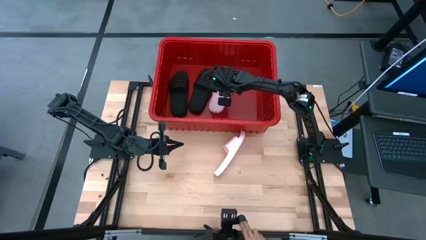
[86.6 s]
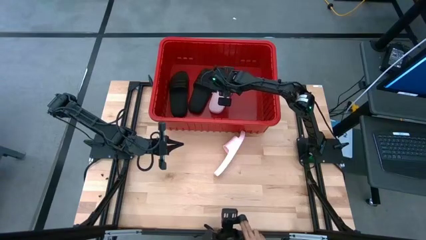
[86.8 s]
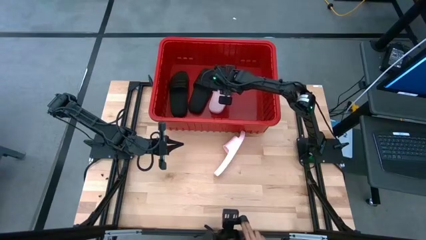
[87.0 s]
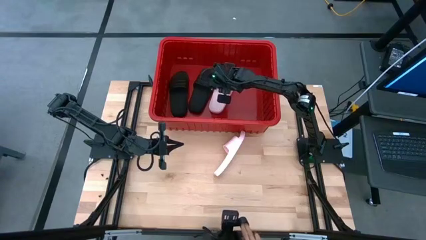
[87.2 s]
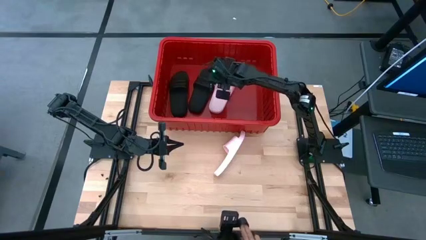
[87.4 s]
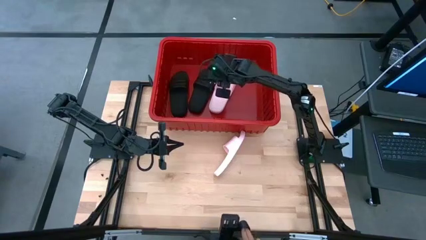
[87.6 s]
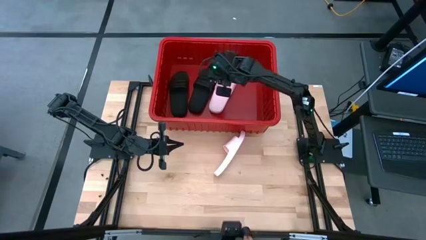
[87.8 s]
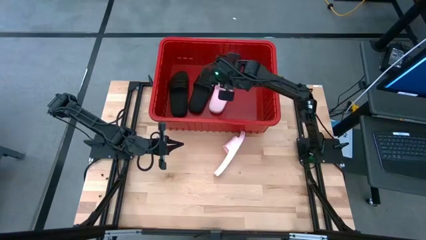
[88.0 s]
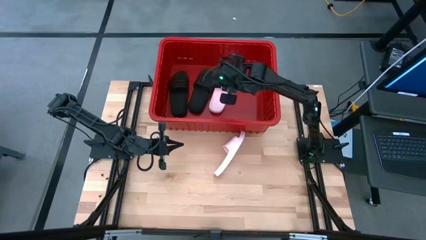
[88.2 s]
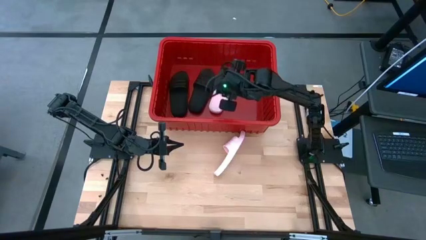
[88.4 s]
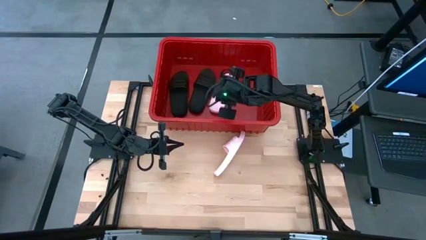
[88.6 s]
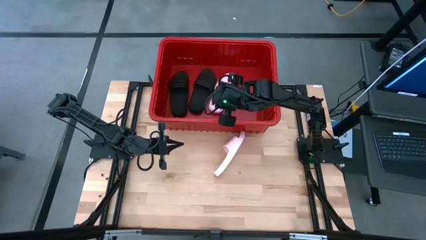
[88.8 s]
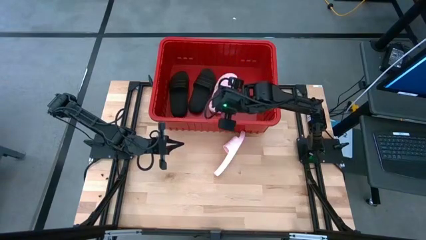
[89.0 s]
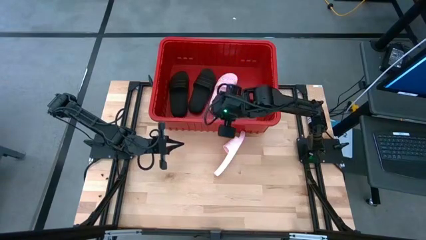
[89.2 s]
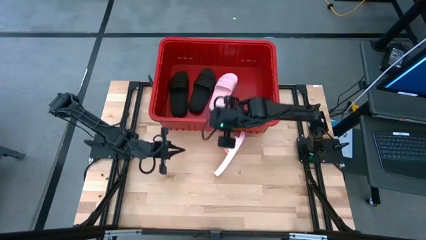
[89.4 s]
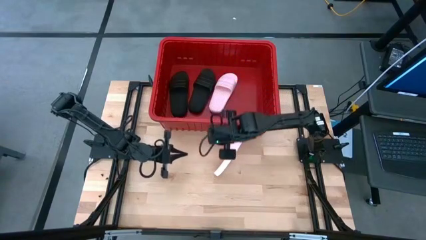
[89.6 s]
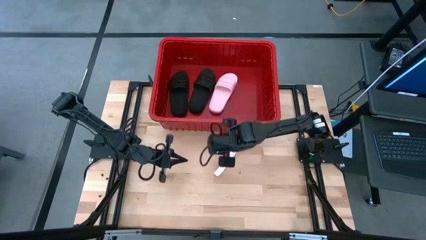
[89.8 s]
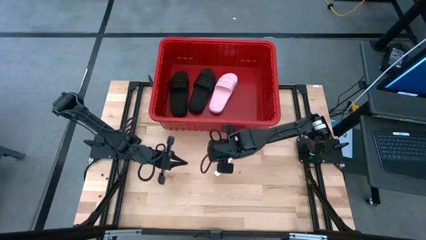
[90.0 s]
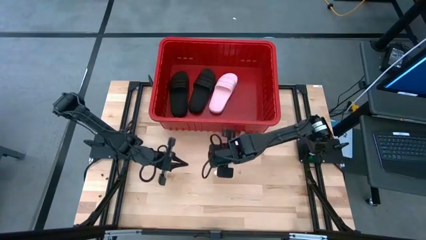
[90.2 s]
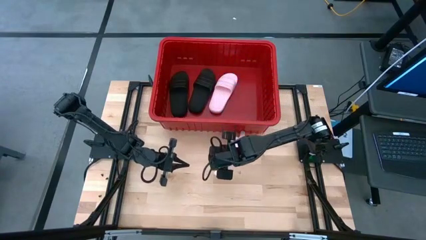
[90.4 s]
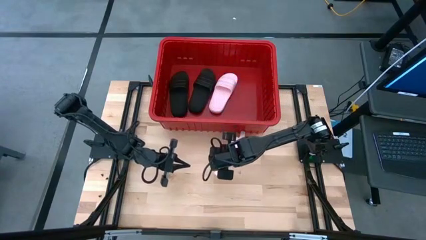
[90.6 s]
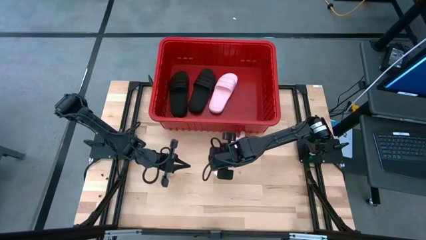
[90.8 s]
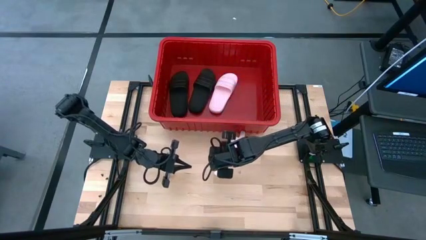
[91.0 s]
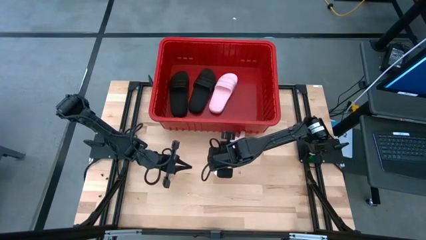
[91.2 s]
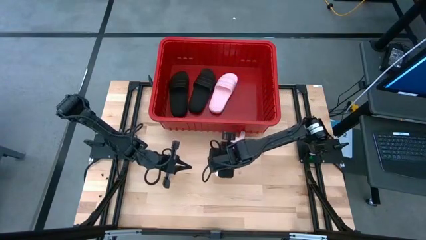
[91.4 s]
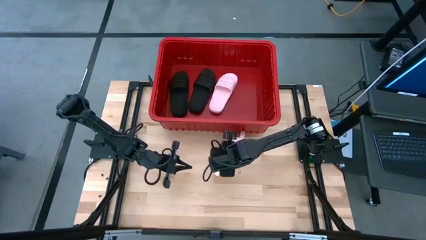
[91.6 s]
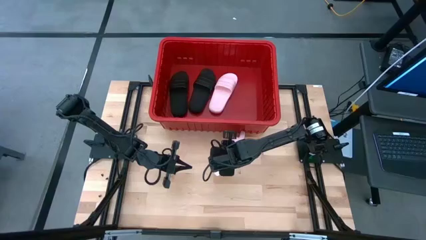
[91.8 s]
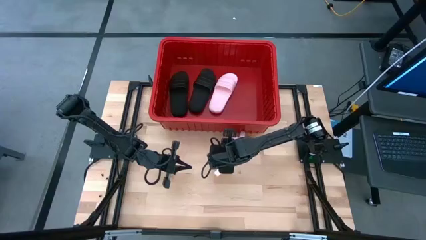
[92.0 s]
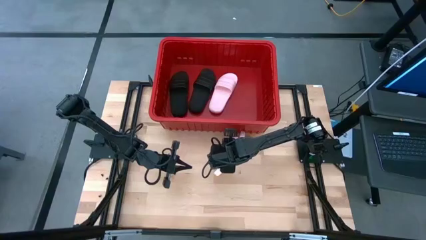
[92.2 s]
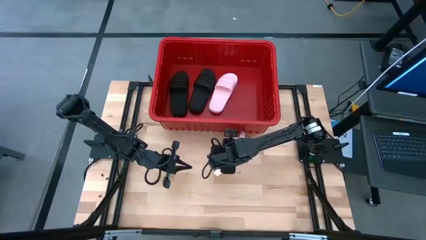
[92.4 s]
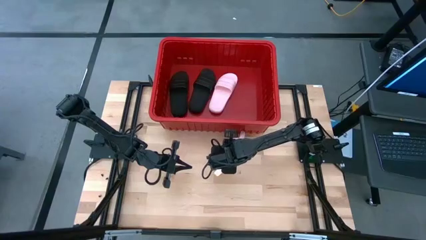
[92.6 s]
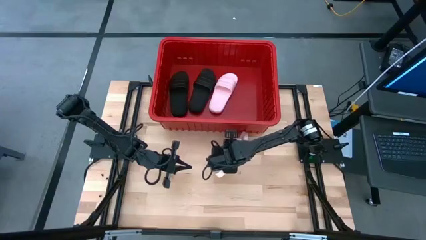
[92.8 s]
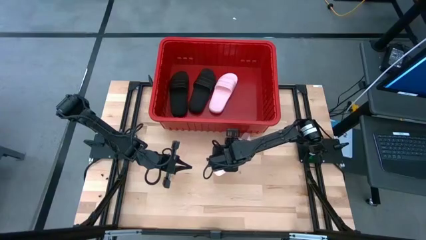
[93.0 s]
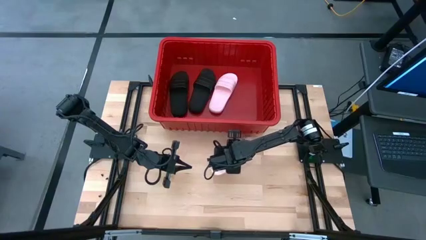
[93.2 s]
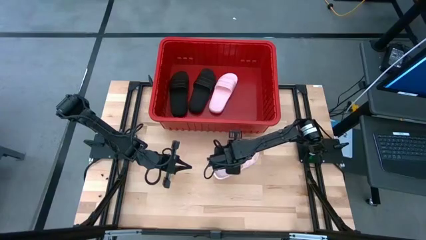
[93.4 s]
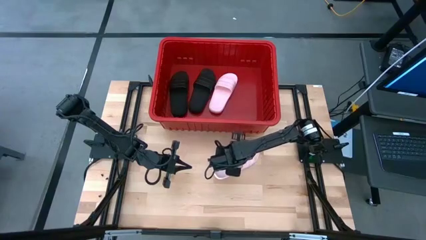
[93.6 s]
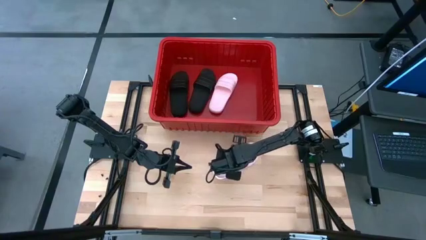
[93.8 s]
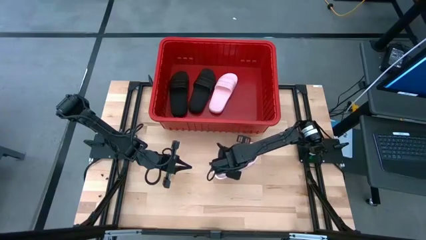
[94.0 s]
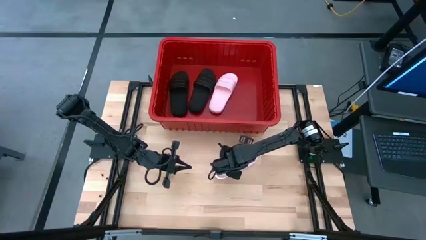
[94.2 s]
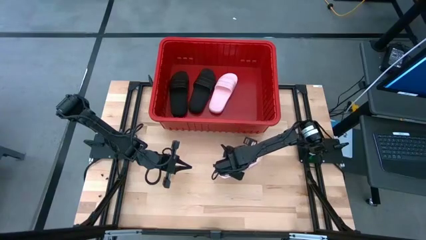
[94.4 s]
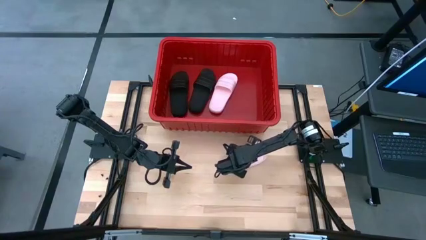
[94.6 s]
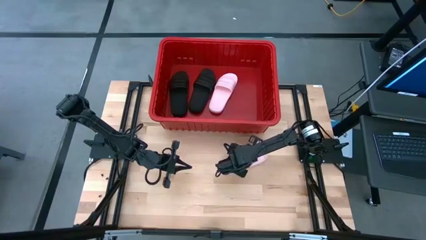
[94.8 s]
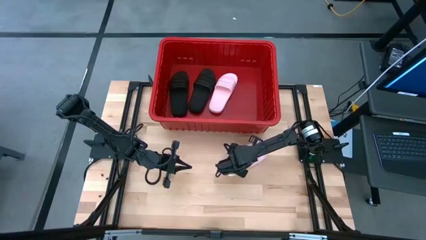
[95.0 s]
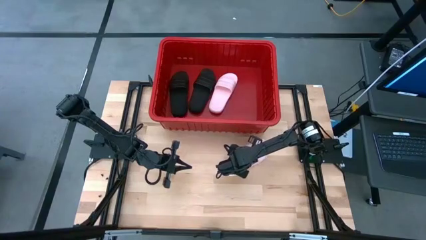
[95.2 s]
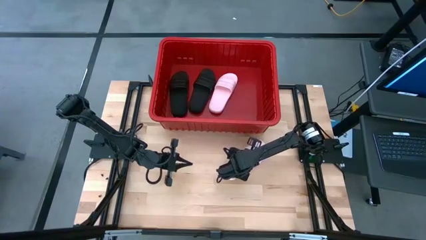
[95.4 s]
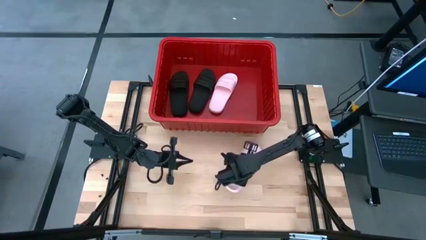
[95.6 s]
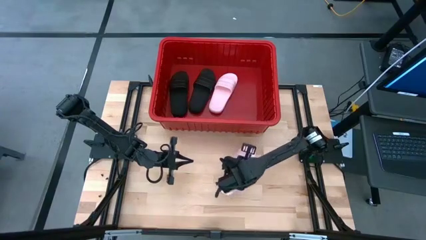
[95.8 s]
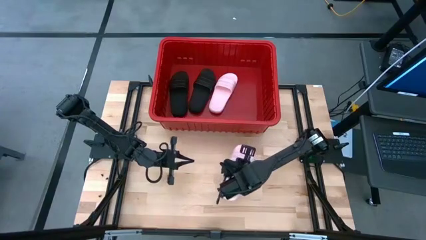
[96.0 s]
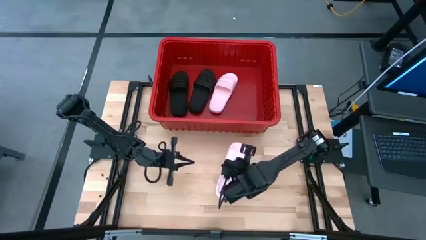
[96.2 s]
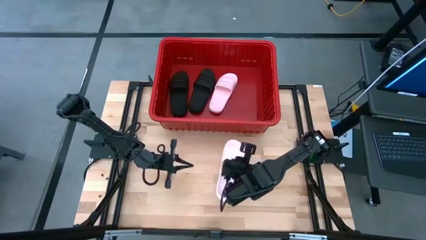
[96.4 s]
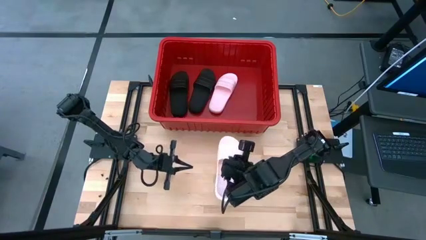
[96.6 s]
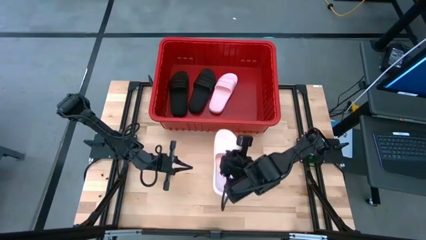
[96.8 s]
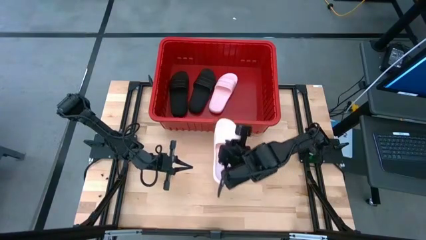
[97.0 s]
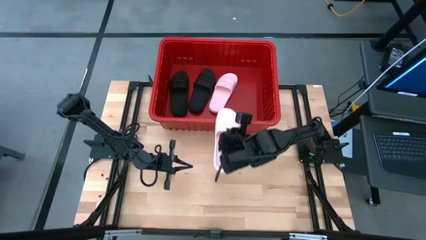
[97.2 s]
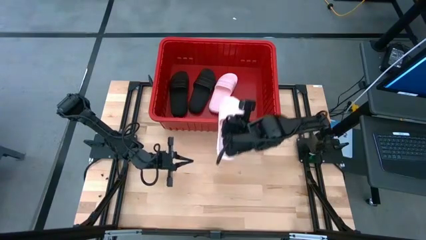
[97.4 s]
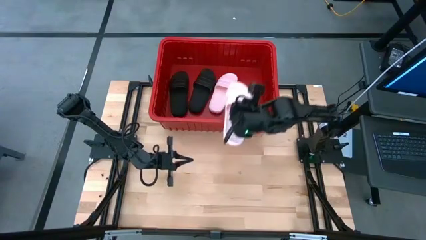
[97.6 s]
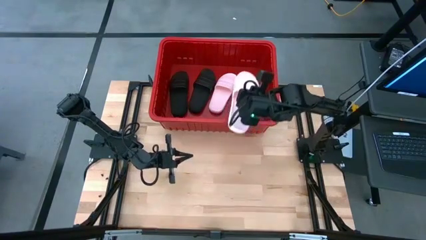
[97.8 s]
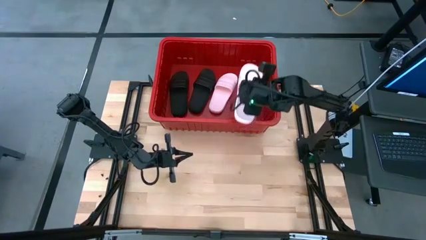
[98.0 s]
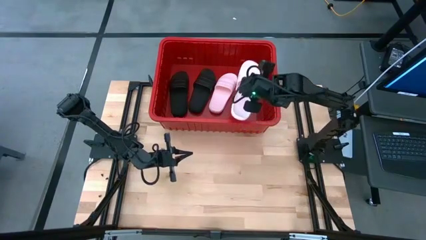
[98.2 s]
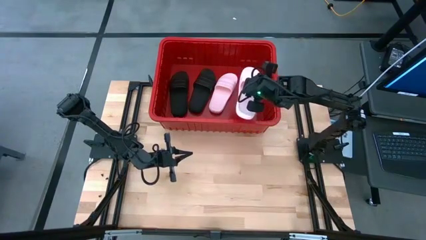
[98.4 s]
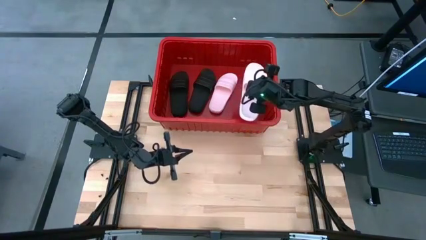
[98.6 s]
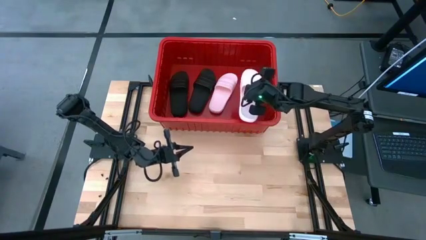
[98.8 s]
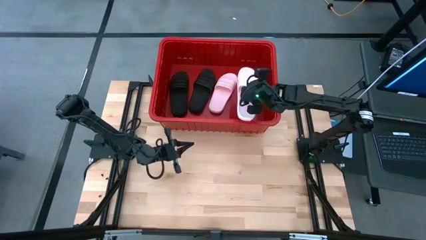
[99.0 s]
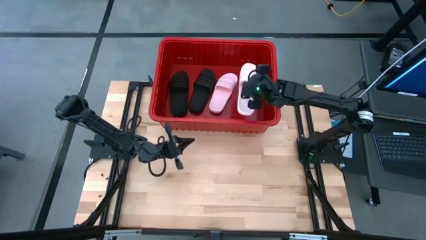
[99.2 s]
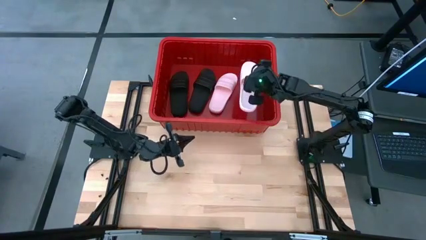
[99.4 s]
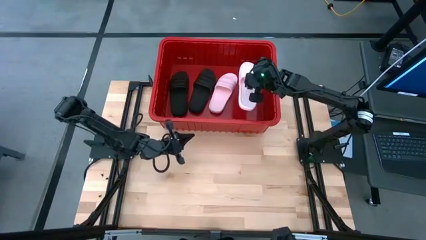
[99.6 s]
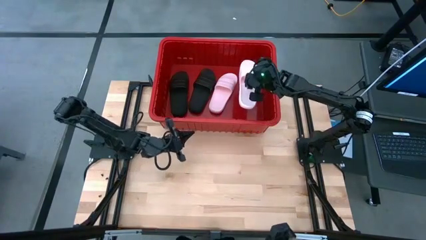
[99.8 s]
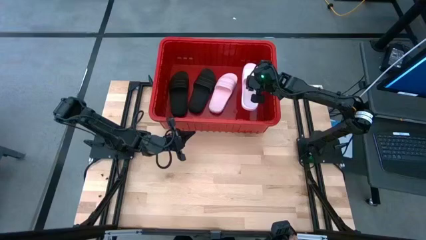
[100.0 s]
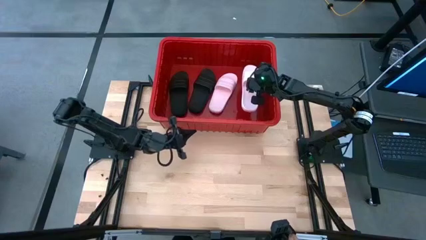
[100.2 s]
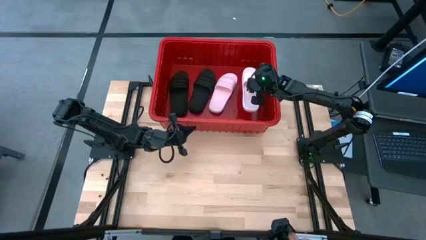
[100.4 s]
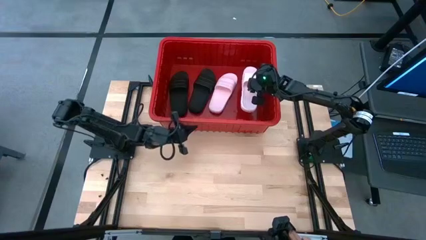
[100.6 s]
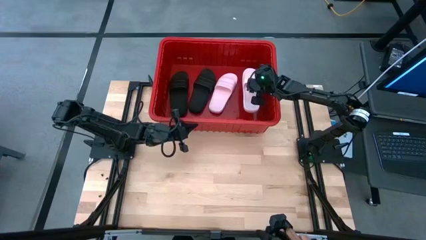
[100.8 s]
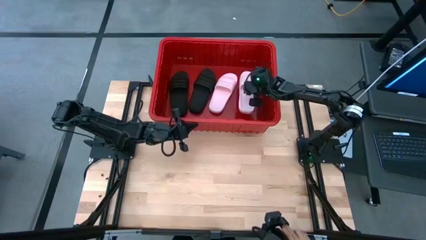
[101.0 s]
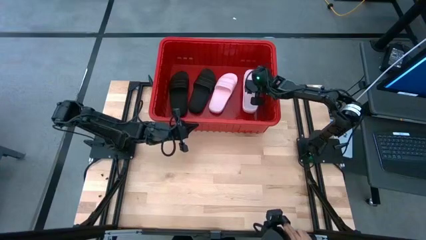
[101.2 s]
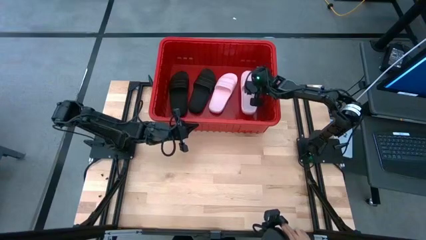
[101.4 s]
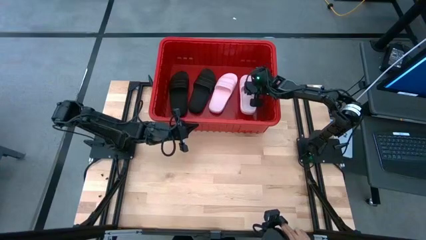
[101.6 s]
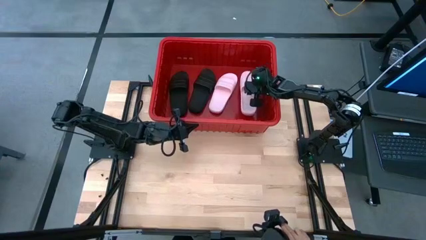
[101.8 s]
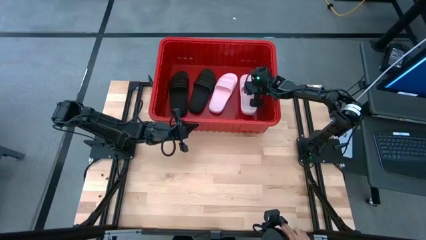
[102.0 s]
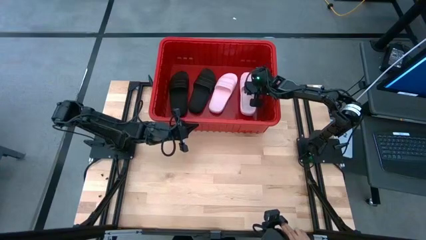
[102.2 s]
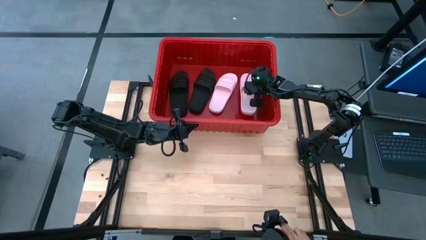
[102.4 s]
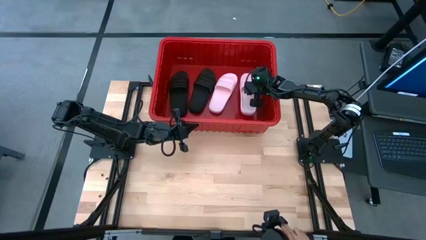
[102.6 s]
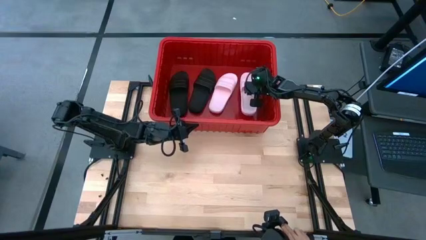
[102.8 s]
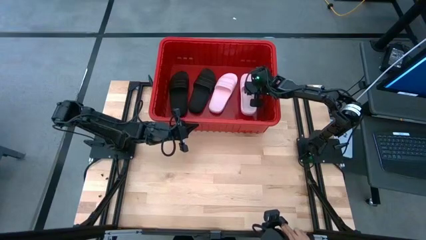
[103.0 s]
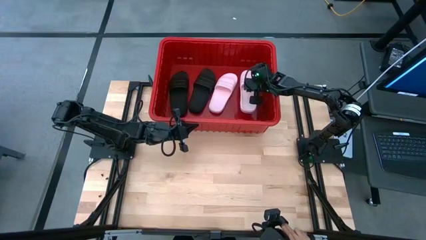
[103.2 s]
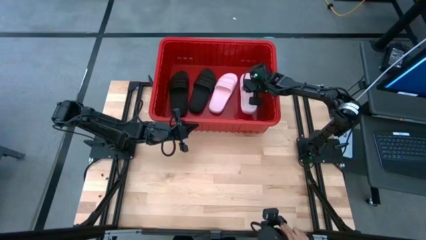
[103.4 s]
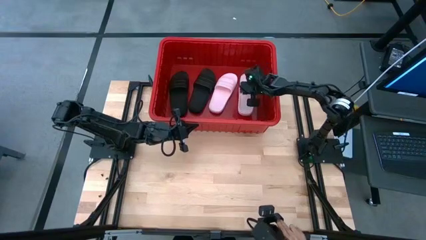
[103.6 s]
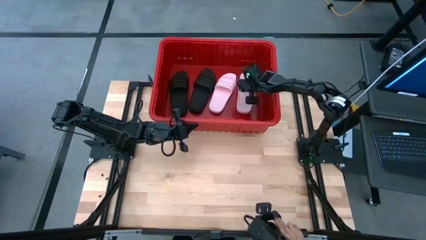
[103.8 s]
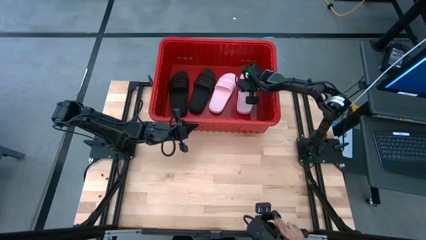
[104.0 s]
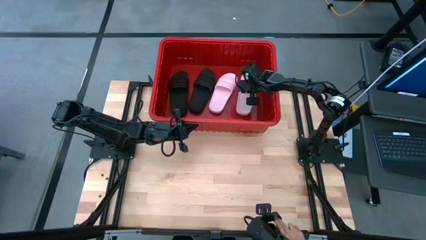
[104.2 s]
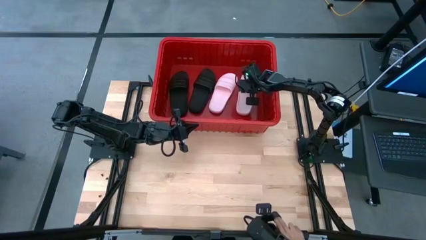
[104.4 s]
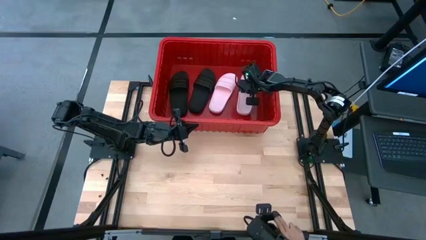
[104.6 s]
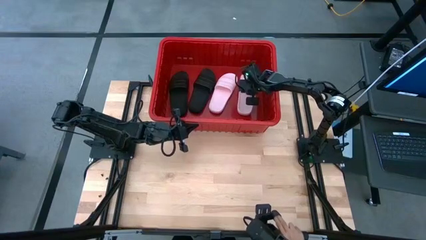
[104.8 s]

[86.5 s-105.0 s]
Task: Pick and place slides into bin
Put the pink slide into the red bin
